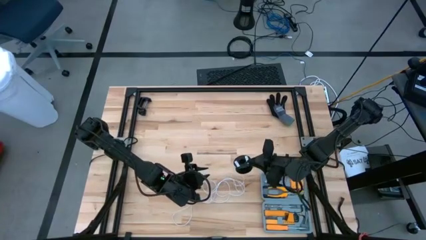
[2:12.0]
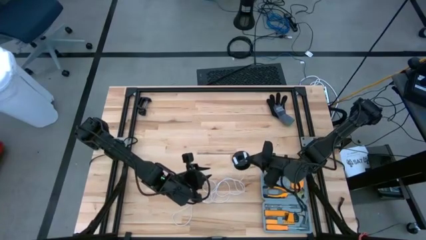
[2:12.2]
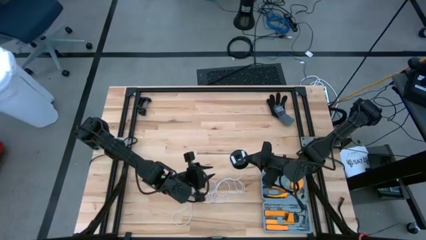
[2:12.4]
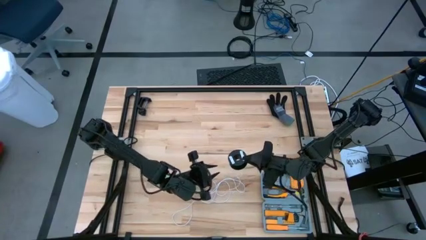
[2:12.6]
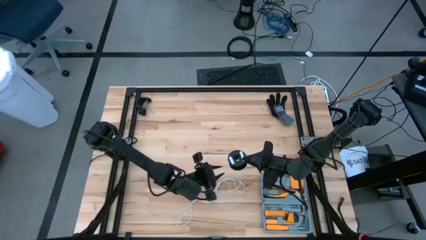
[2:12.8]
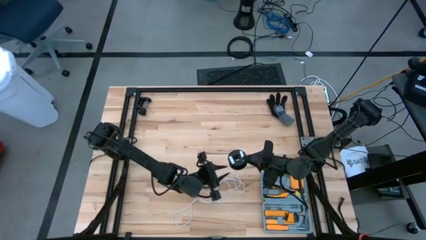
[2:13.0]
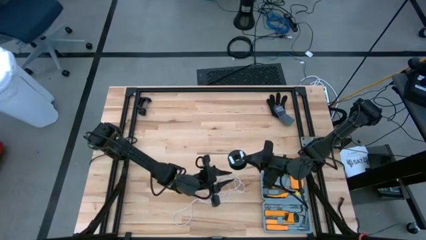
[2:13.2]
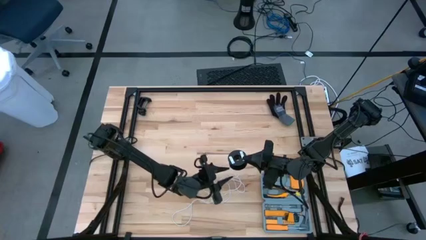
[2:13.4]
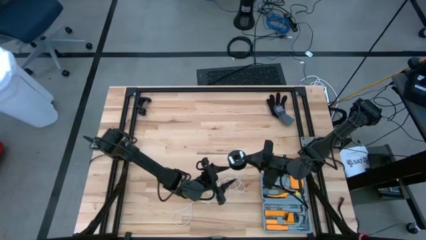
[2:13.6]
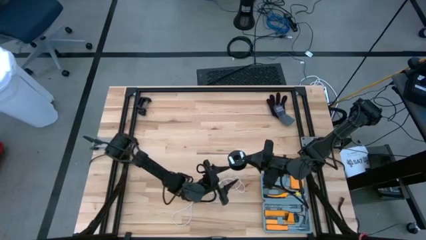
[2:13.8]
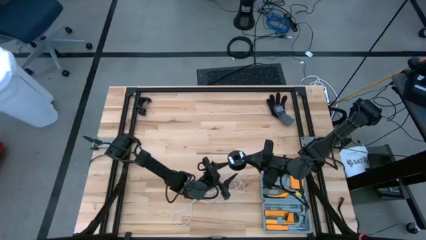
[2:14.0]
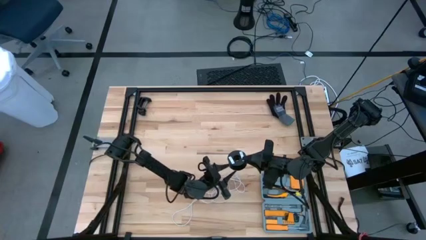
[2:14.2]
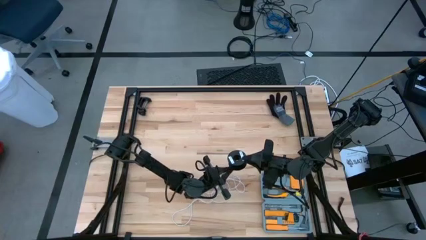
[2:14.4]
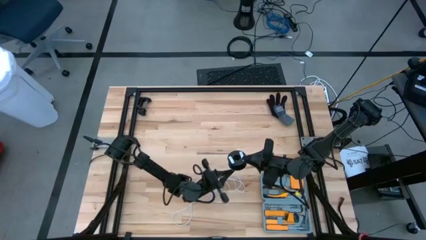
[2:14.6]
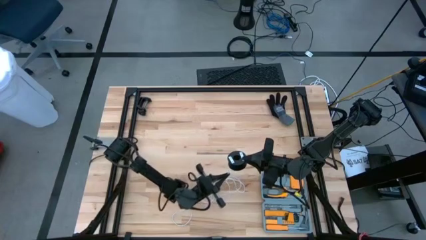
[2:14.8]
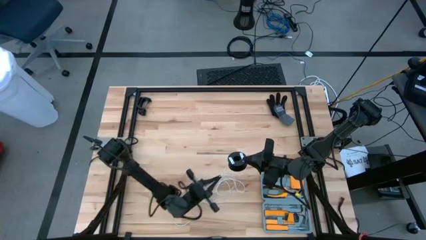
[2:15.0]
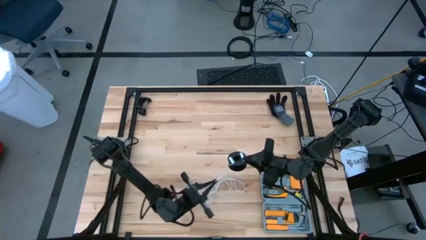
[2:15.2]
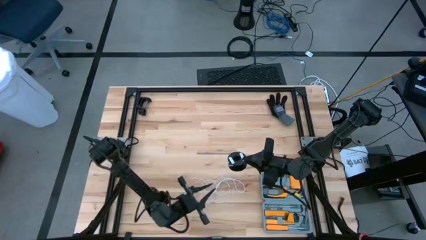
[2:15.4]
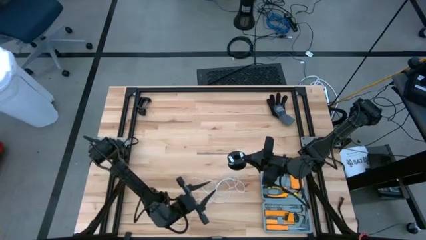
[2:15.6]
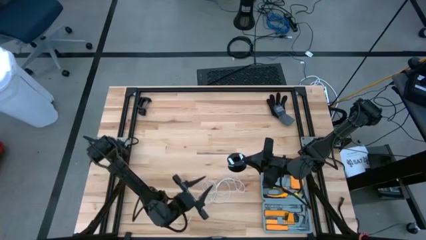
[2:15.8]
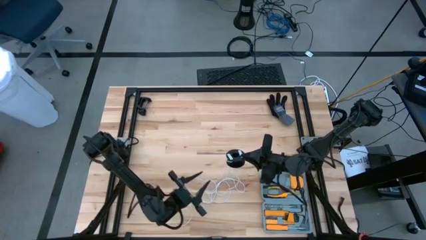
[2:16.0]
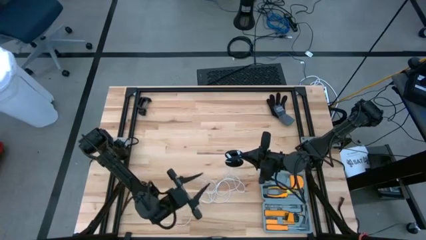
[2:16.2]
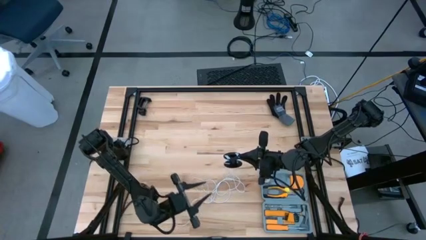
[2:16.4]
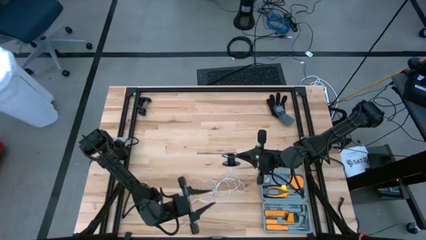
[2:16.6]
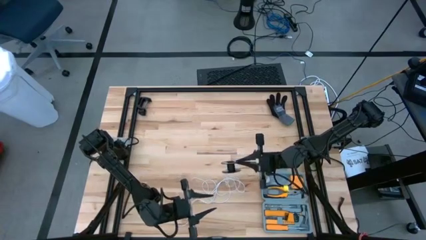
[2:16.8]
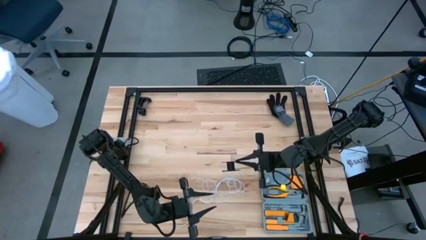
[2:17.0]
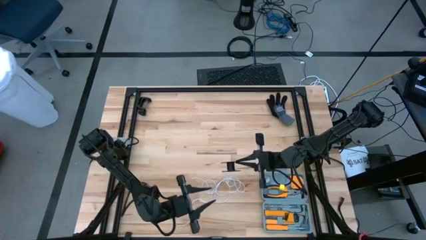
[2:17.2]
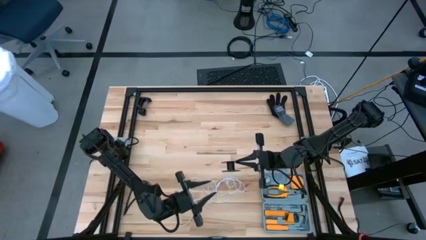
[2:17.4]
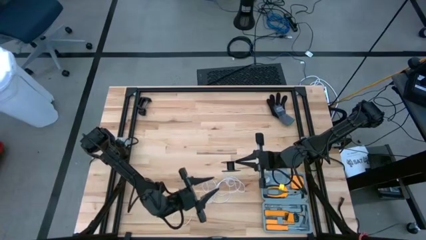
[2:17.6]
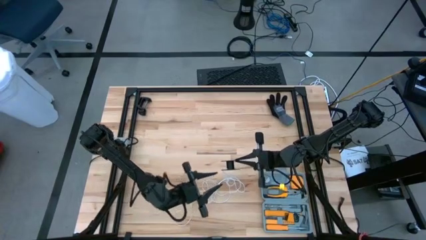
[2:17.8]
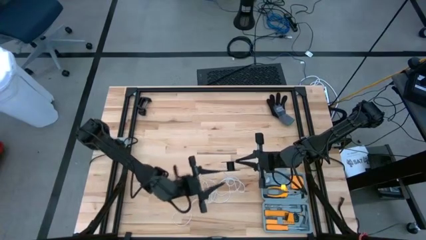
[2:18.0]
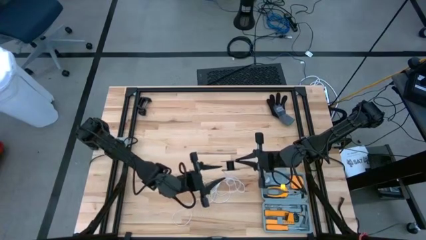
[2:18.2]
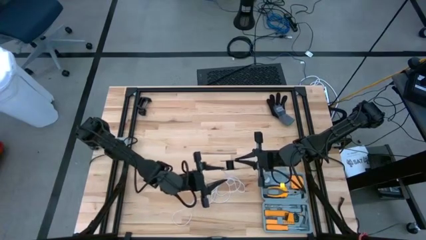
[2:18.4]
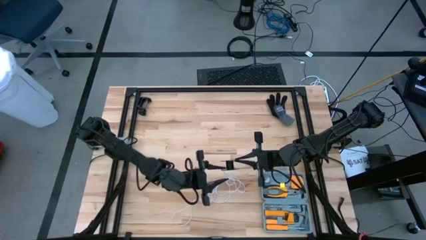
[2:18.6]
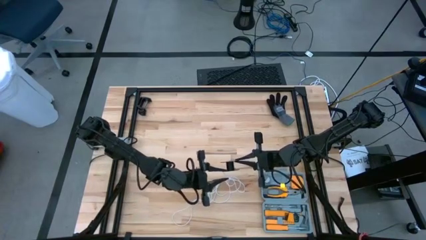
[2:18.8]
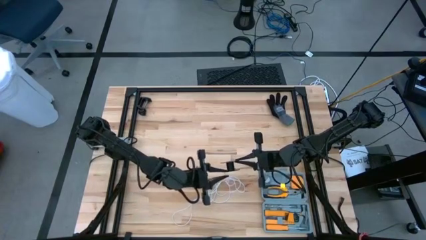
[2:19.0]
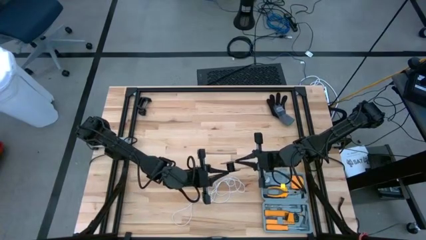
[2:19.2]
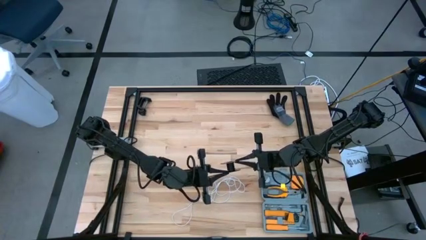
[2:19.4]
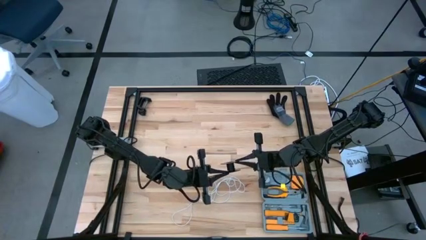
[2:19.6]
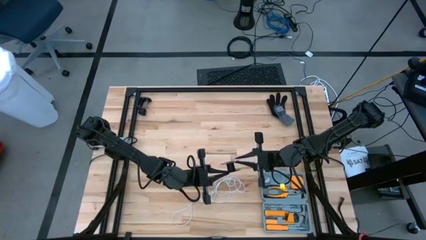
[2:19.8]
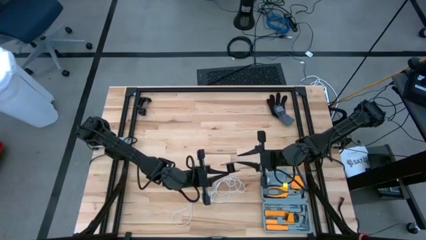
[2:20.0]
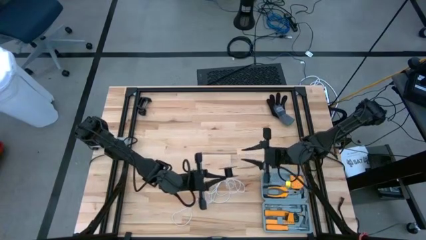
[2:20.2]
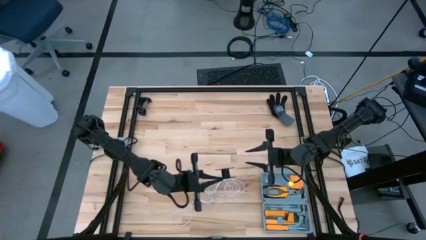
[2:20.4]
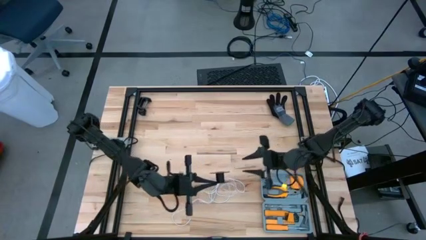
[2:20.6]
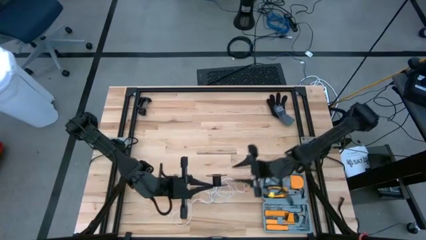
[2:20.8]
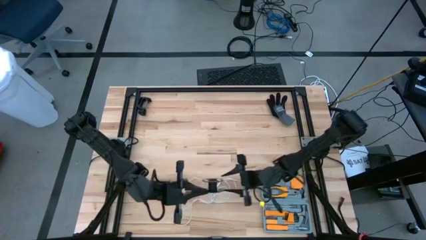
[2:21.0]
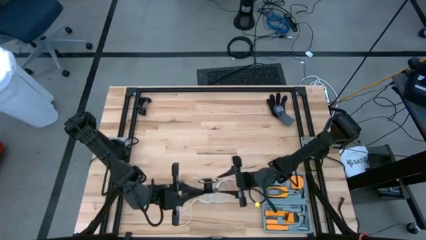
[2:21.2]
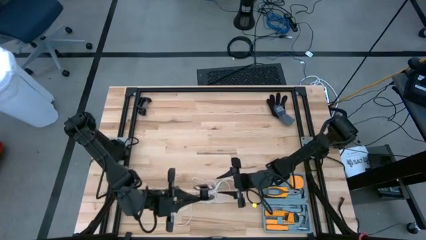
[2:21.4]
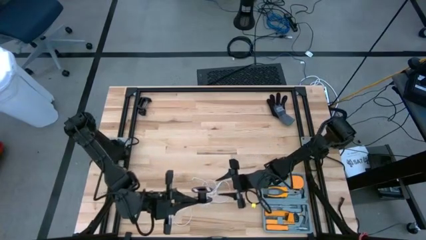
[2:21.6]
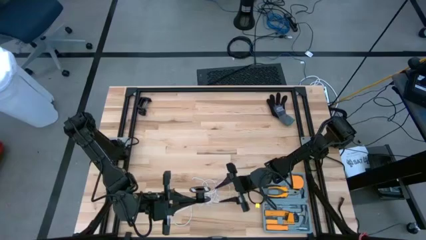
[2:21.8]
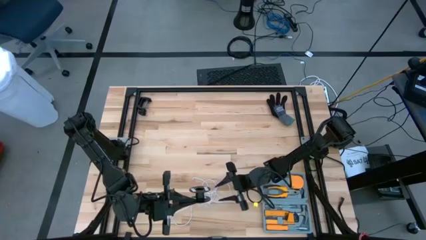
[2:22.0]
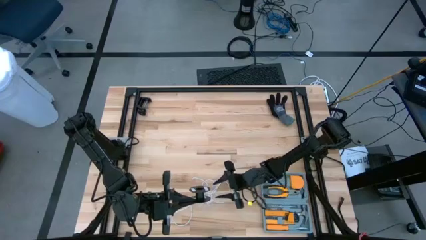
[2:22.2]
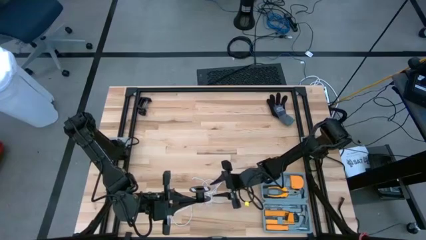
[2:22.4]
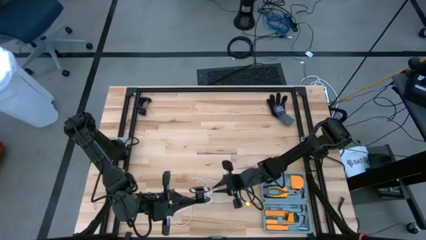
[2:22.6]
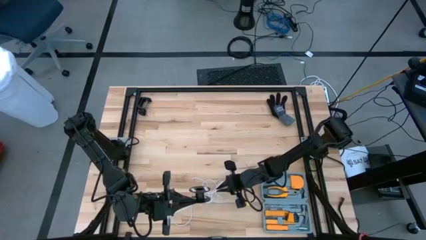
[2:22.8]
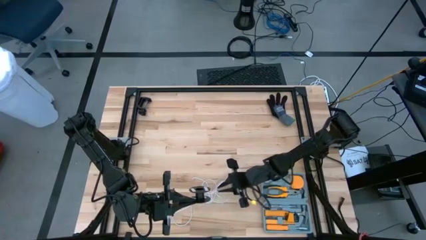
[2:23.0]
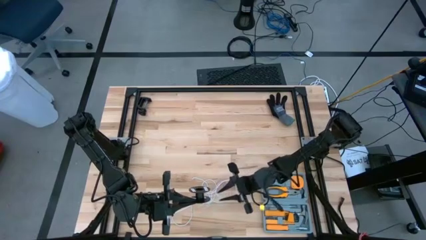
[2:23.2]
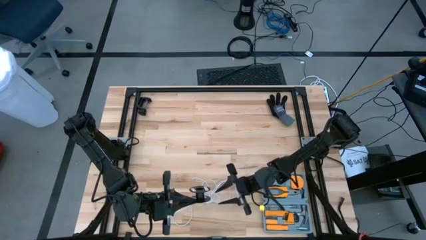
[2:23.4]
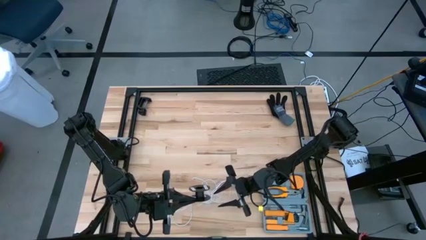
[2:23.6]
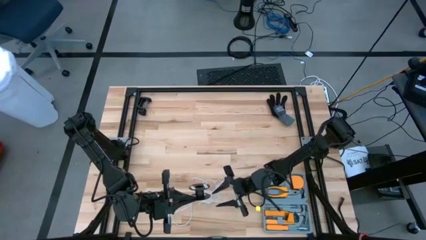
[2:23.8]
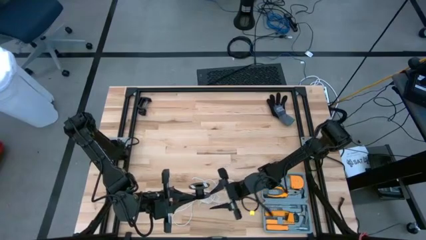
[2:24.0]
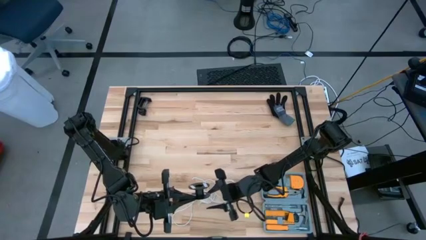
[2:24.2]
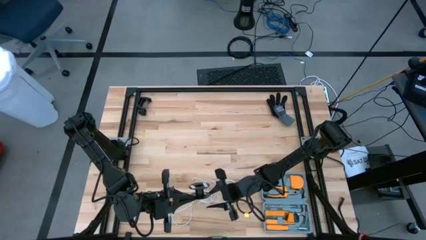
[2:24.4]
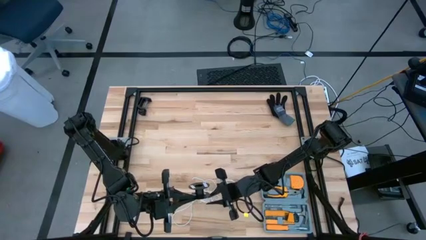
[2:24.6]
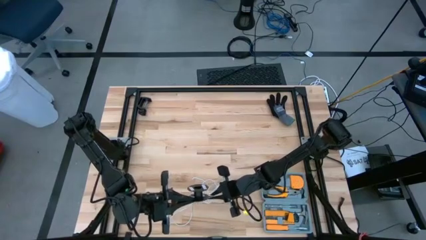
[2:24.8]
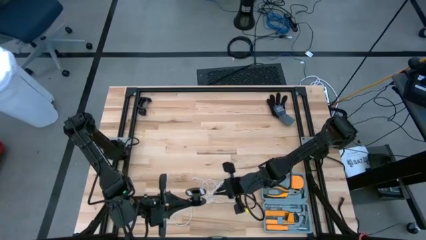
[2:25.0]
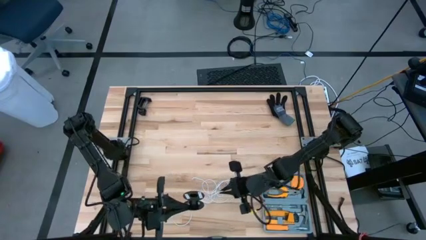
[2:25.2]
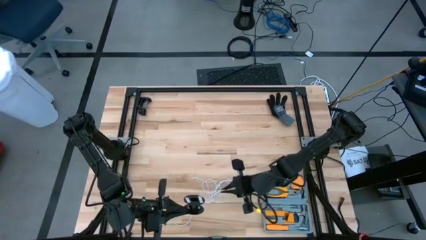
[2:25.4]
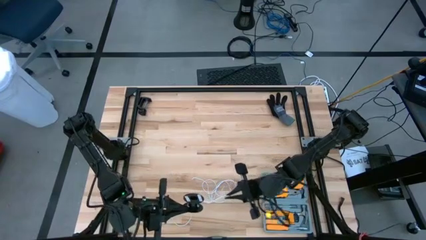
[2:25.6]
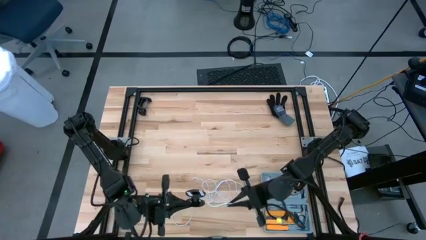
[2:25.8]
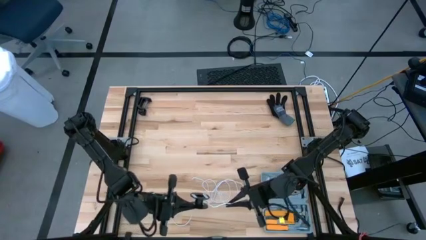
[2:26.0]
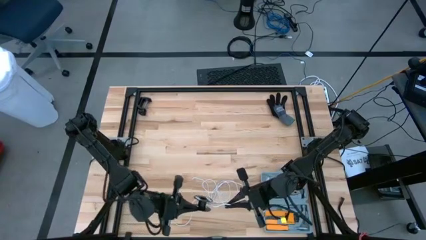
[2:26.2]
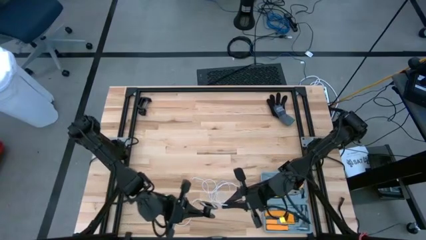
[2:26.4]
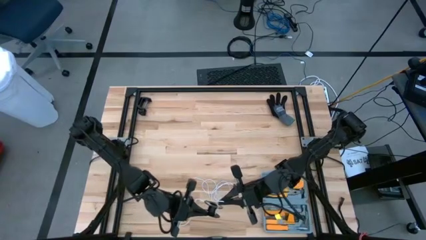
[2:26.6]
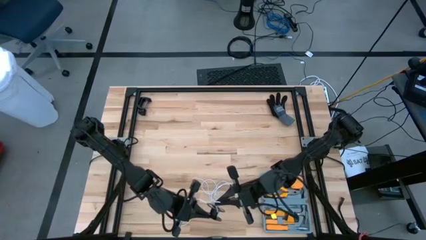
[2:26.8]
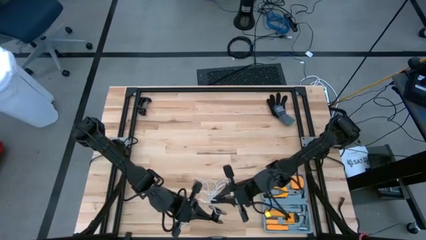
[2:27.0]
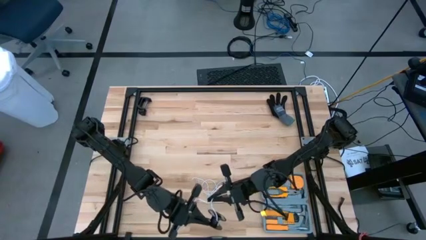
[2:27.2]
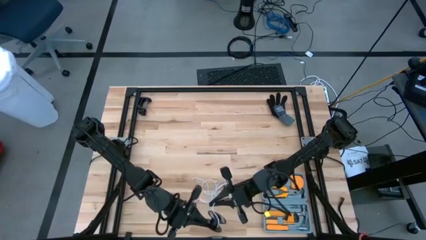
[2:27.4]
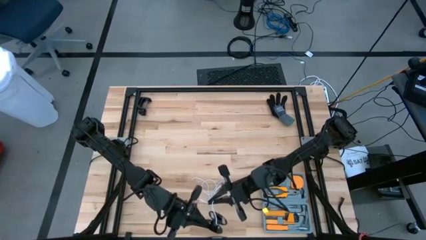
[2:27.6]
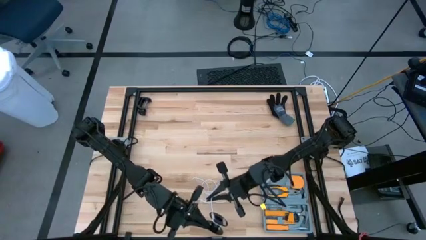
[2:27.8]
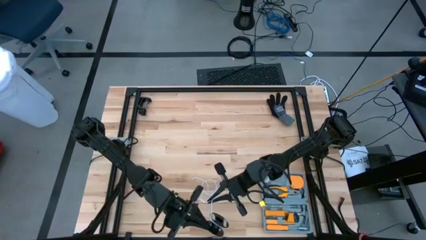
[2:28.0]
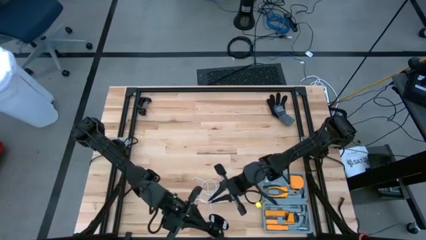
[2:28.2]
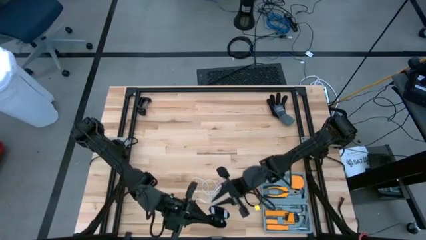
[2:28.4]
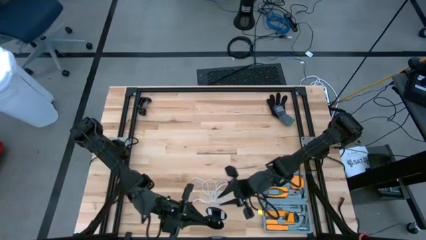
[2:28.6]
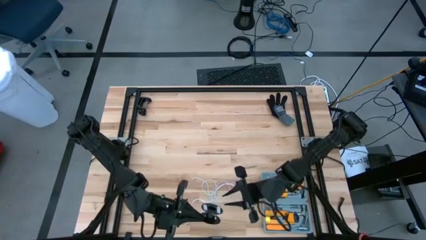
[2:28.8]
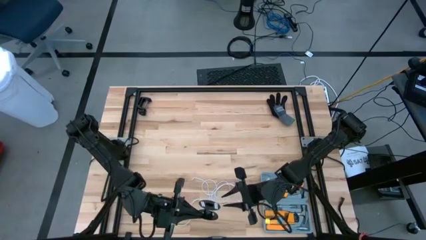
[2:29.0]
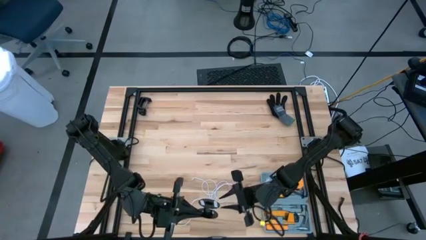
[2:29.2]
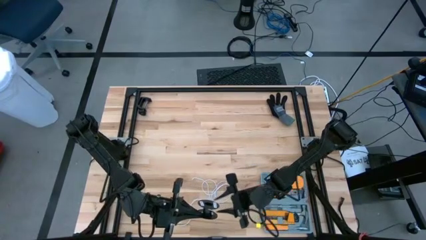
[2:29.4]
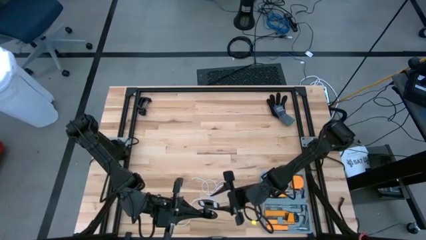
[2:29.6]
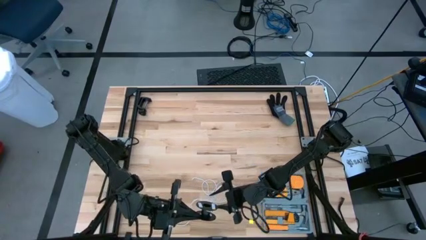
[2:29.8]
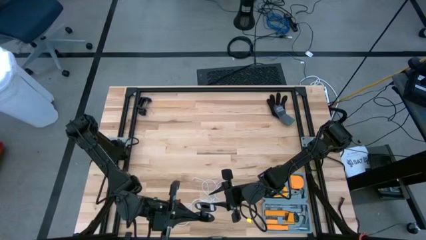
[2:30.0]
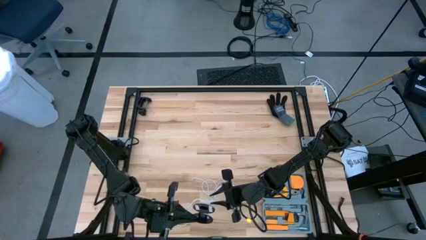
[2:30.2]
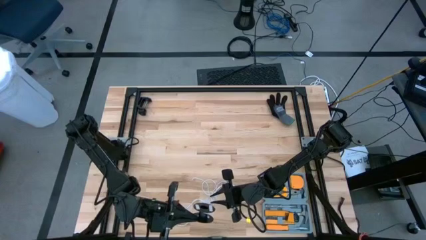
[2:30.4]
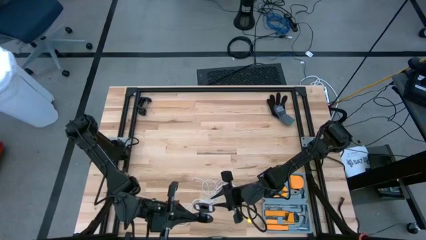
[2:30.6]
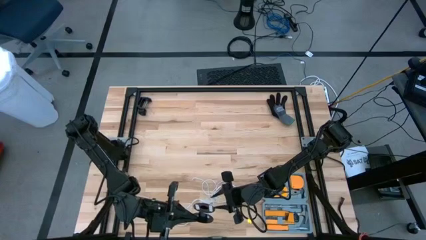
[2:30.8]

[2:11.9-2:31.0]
Task: Coil cords
Coil the white cable wire onto the spool
